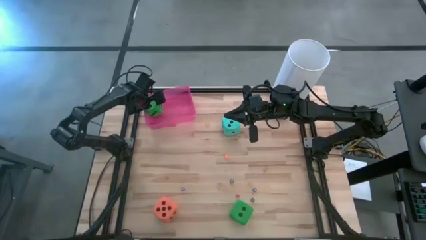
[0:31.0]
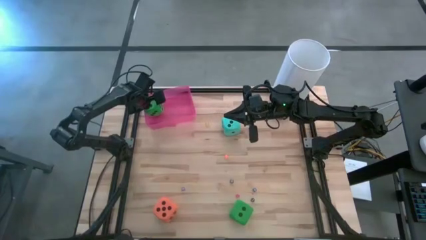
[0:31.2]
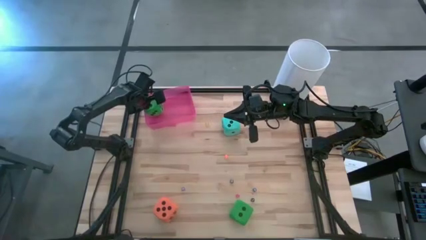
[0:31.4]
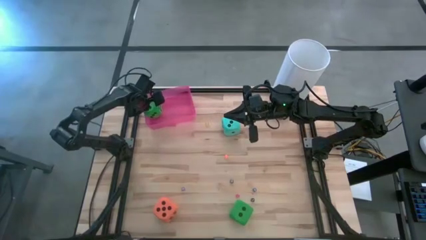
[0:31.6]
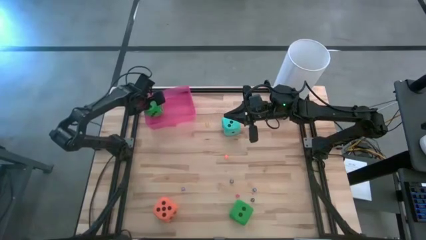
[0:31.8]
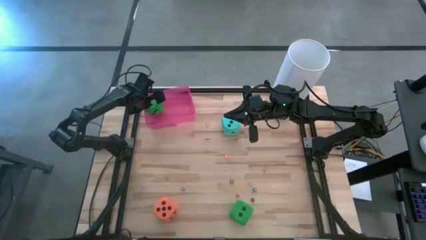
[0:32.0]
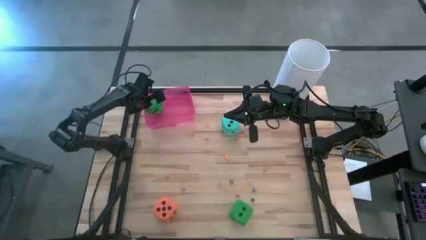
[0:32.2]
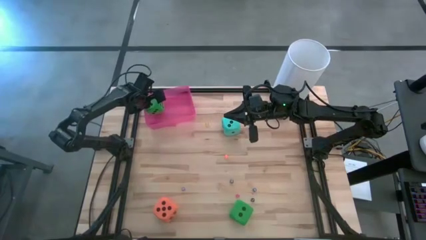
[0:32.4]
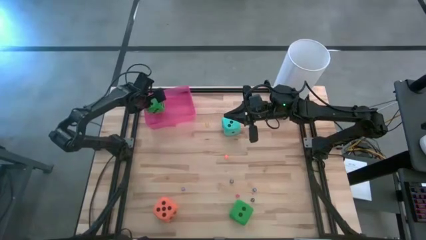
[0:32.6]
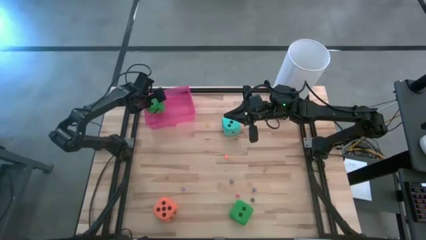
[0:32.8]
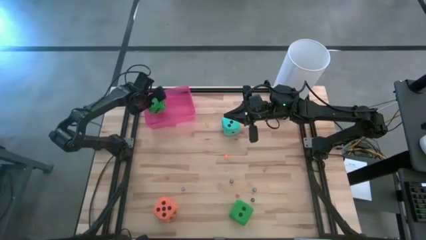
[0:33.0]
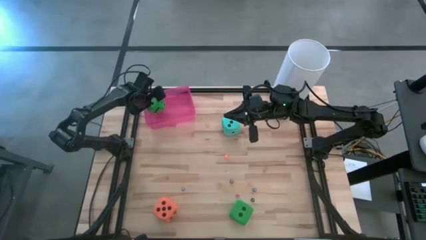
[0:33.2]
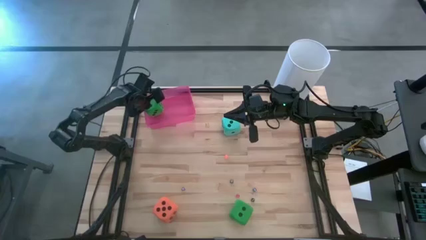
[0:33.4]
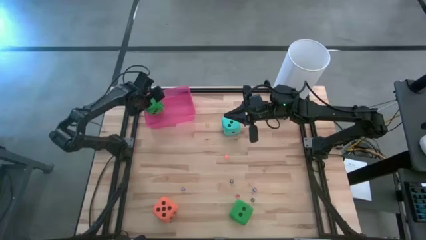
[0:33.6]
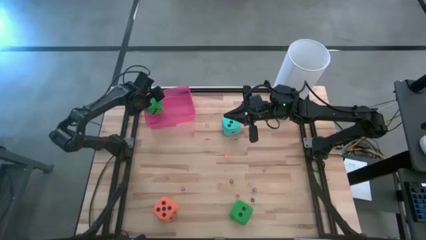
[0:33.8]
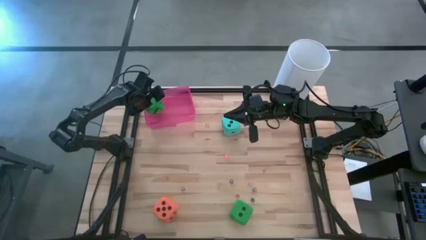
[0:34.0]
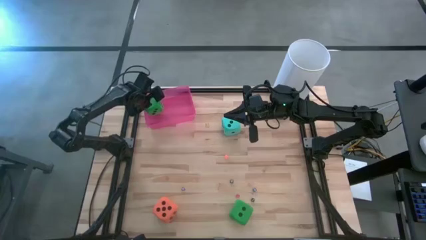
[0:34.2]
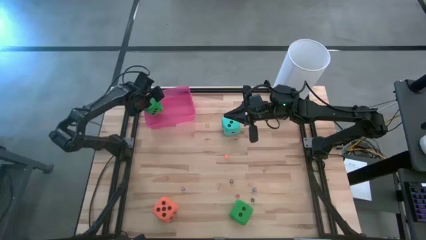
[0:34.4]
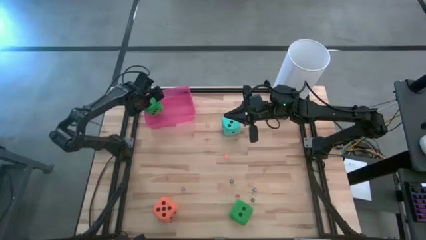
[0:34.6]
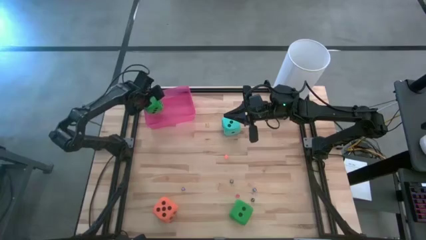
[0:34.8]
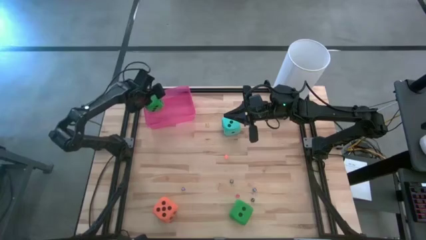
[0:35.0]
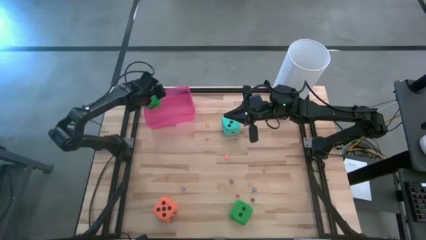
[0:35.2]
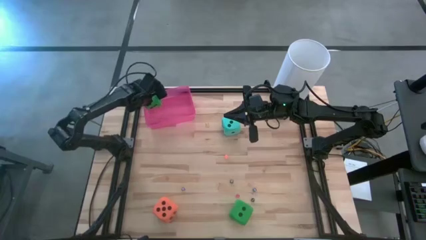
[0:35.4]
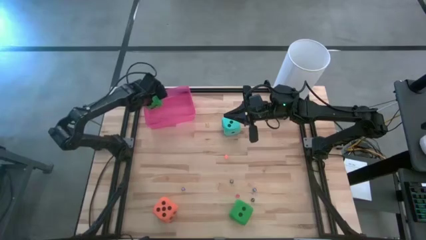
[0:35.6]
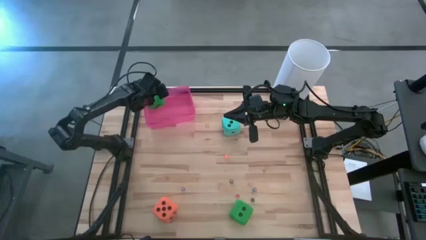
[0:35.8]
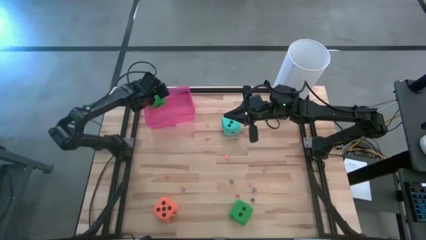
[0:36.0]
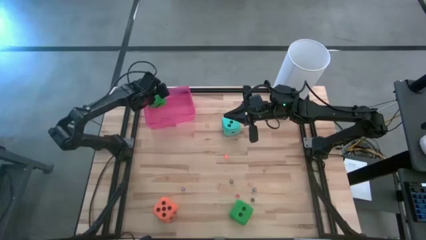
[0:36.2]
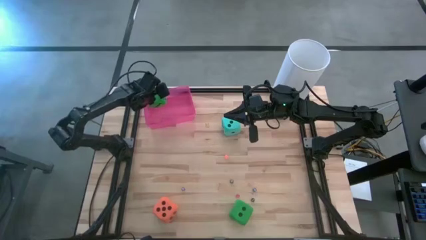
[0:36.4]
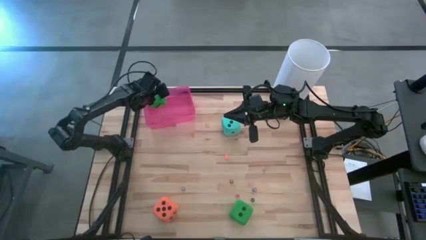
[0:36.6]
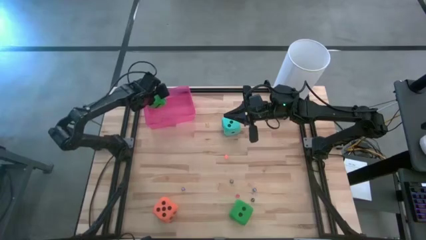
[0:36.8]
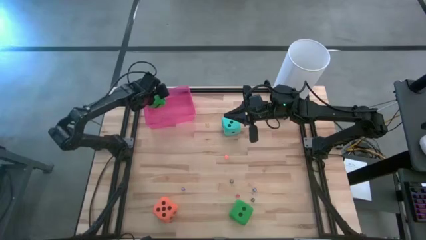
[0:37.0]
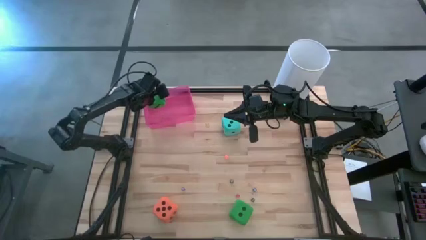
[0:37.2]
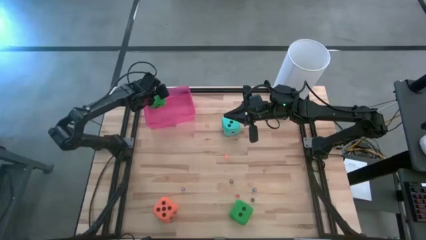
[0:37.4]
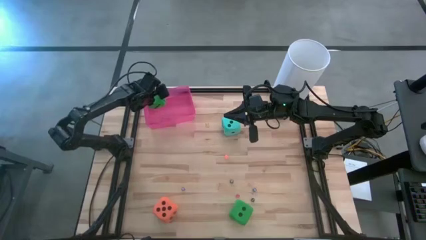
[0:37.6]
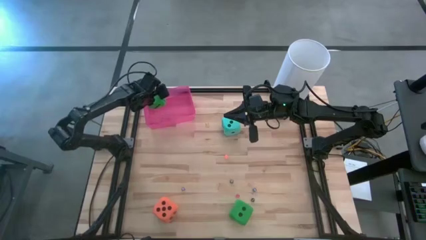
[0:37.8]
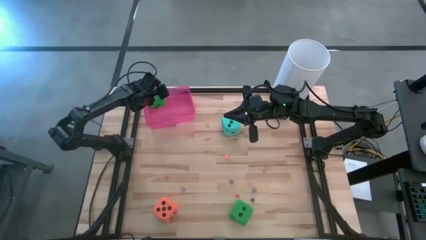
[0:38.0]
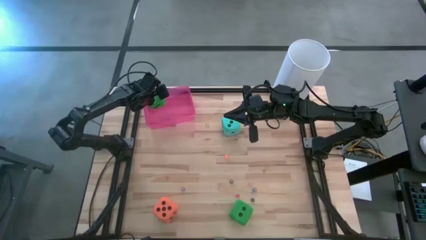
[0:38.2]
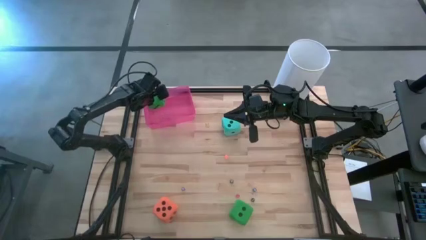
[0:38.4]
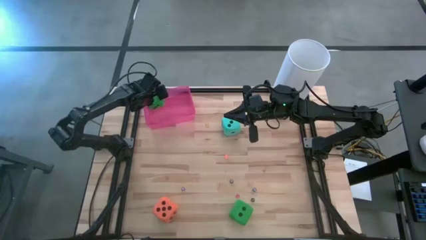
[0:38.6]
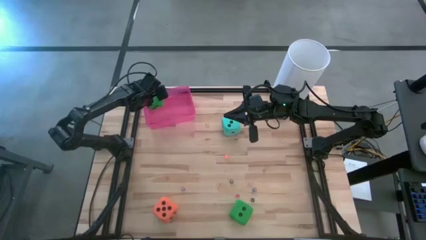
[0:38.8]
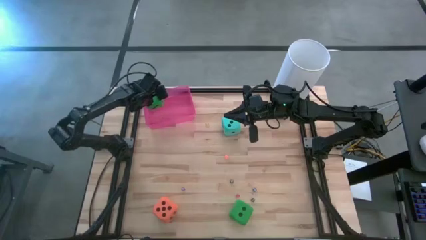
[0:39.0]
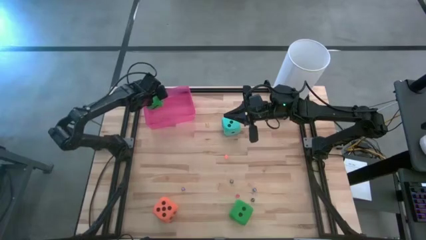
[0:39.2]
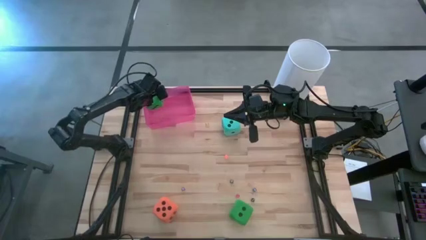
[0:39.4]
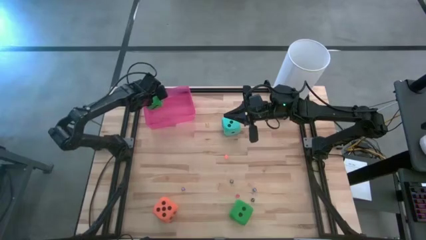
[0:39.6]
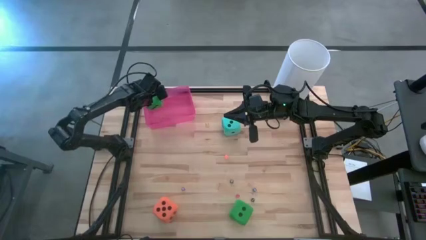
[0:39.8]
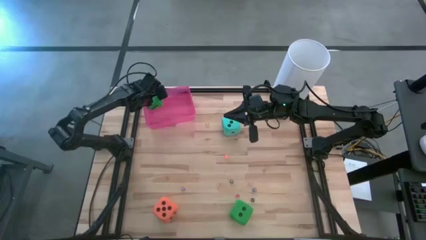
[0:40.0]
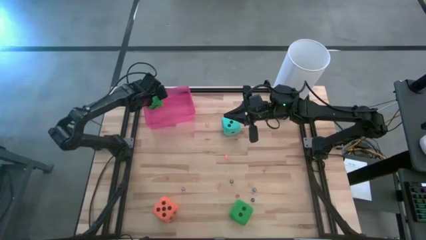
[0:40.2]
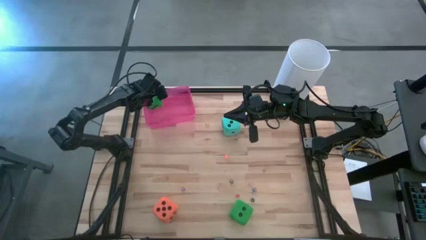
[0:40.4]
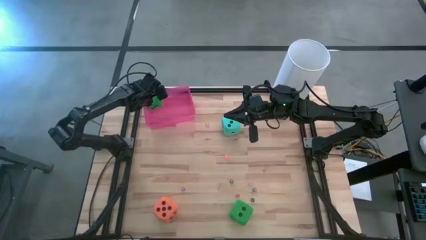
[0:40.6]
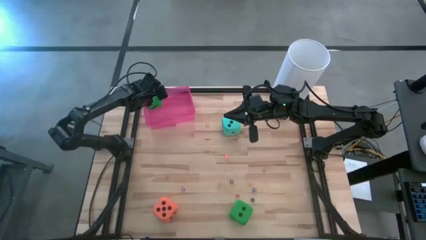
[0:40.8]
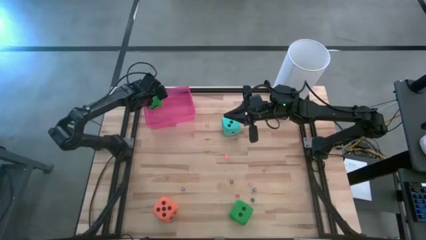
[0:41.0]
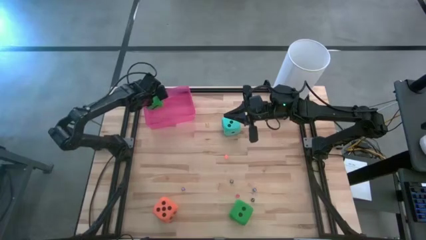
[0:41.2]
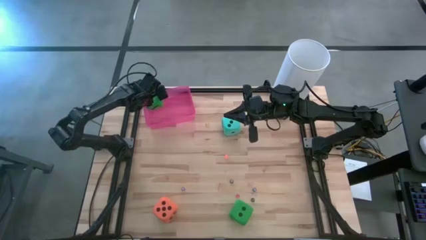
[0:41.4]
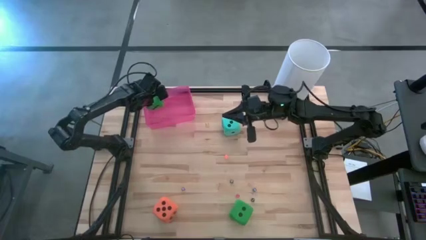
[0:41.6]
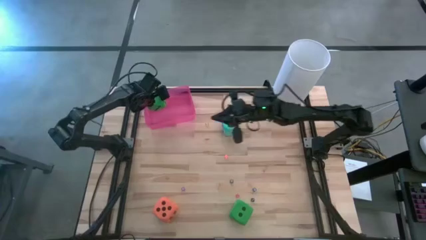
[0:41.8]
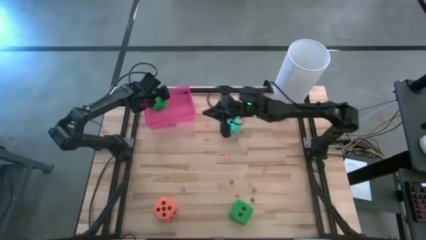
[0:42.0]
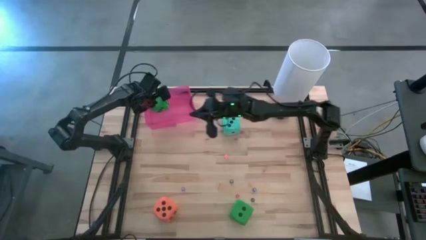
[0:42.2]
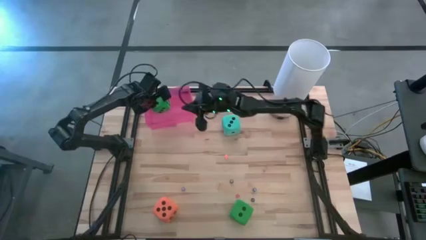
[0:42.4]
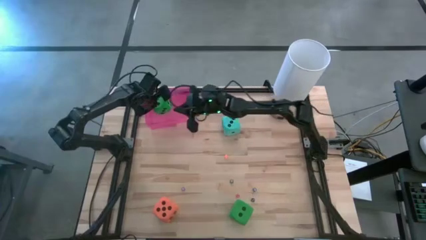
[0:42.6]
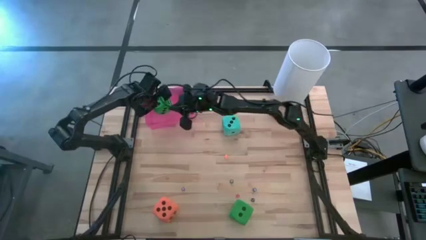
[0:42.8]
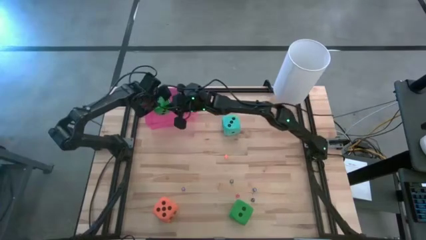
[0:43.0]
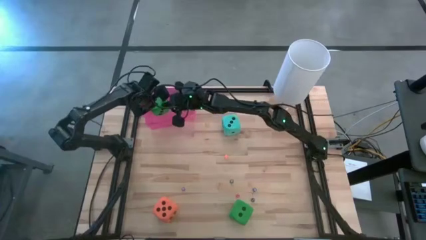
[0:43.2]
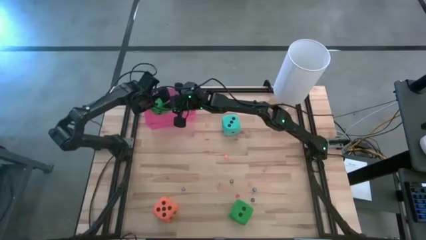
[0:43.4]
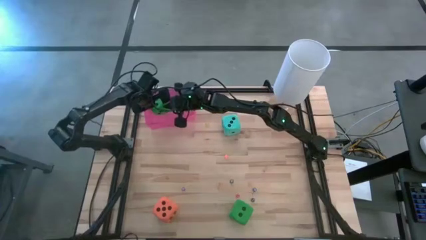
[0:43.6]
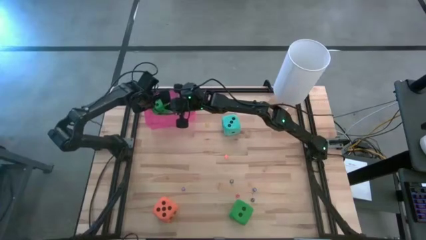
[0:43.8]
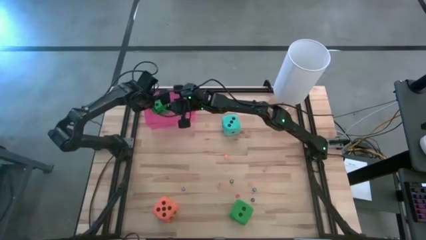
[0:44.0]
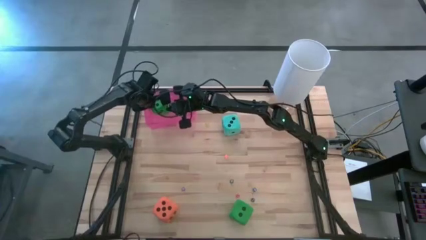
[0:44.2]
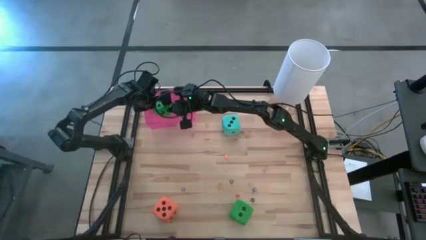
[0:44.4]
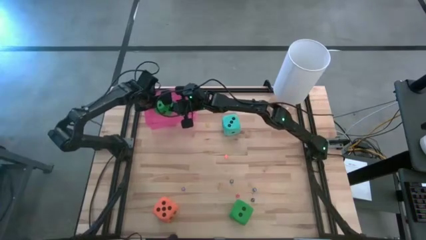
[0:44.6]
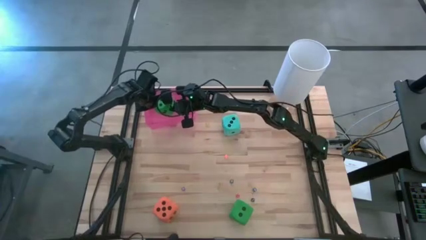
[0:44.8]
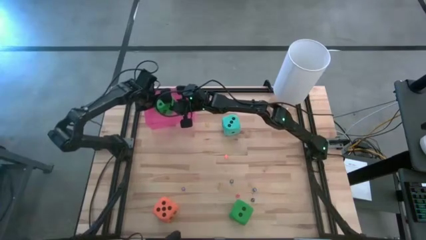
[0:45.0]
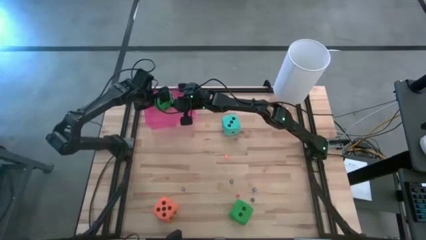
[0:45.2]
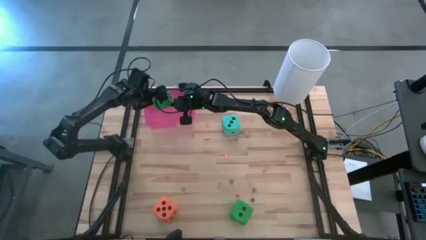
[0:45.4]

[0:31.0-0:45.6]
Task: Pick & Place Dice
Put the top big green dice into the red bin
